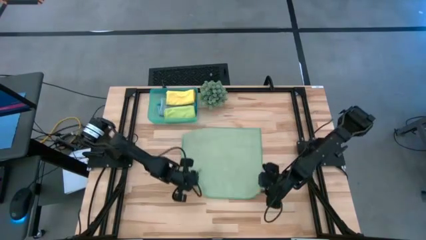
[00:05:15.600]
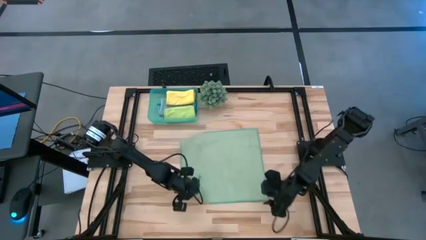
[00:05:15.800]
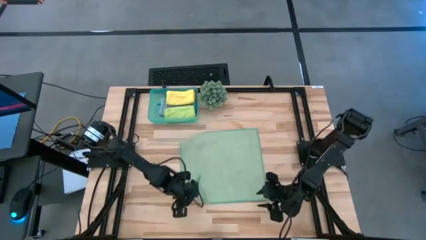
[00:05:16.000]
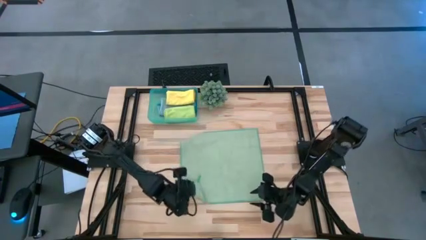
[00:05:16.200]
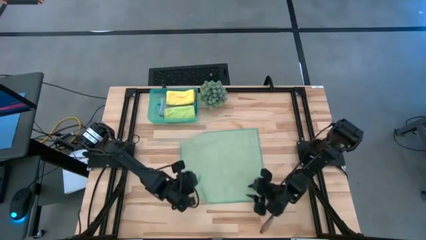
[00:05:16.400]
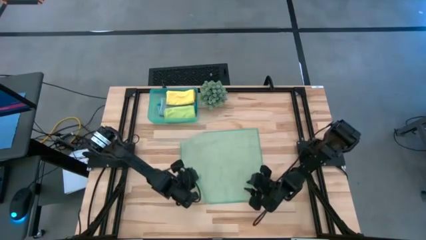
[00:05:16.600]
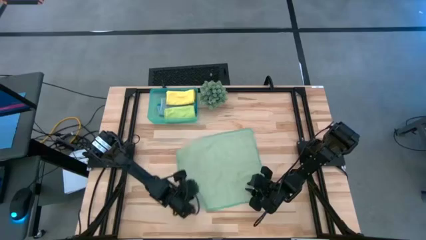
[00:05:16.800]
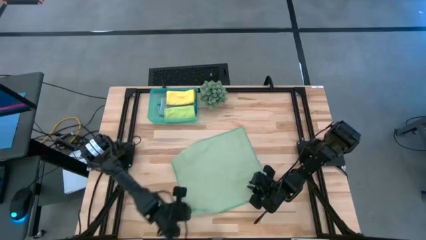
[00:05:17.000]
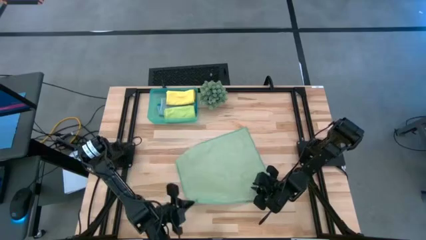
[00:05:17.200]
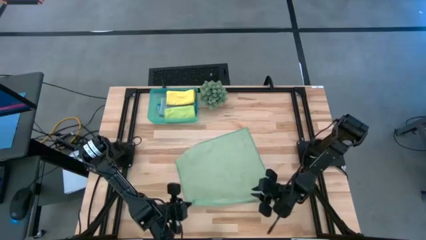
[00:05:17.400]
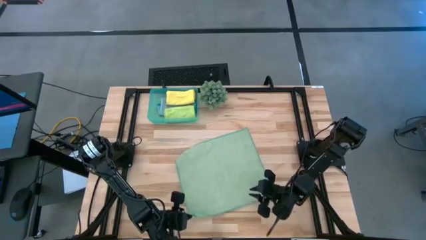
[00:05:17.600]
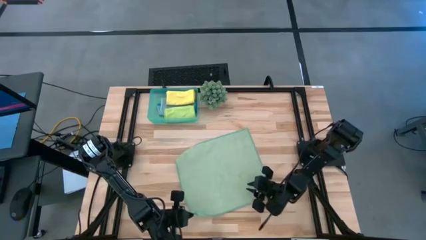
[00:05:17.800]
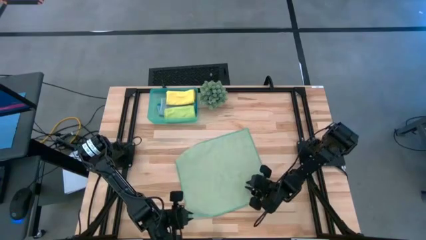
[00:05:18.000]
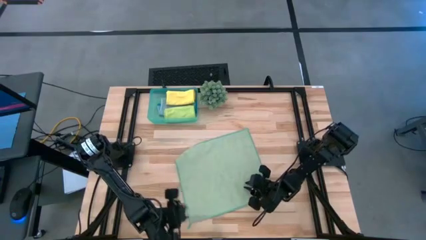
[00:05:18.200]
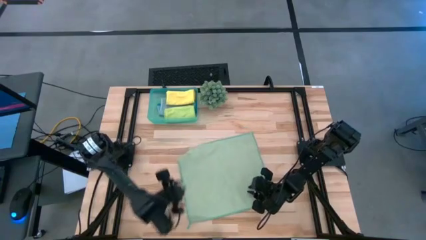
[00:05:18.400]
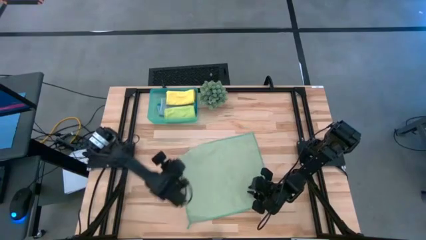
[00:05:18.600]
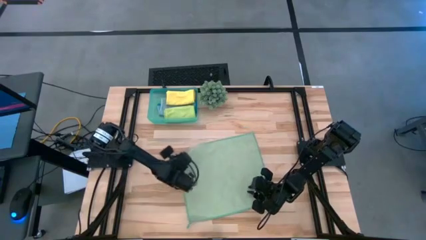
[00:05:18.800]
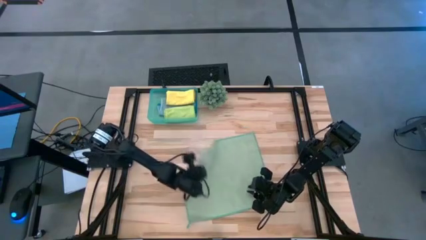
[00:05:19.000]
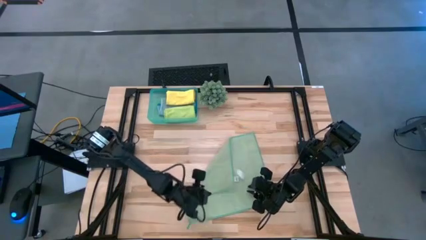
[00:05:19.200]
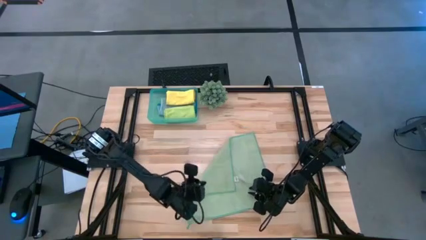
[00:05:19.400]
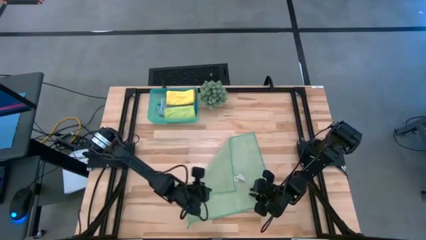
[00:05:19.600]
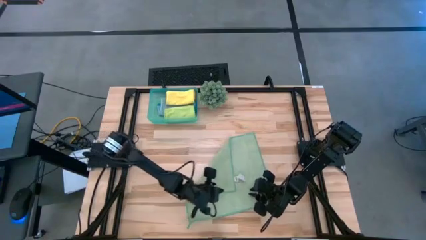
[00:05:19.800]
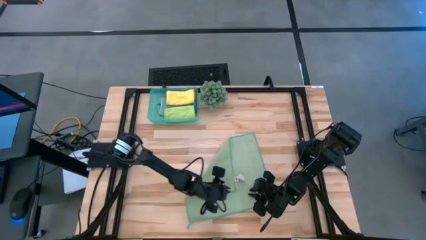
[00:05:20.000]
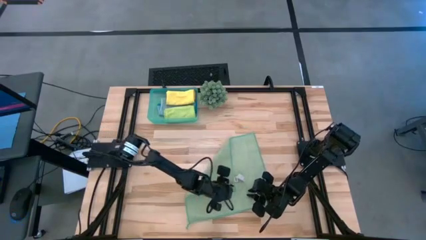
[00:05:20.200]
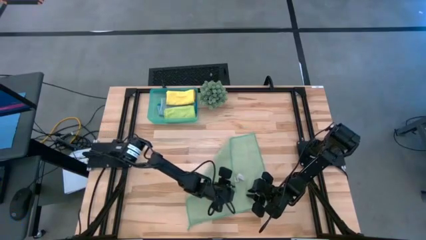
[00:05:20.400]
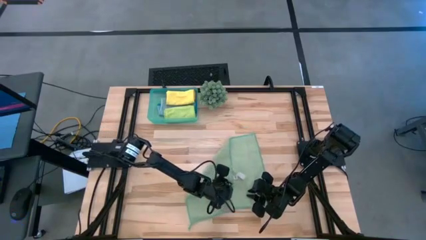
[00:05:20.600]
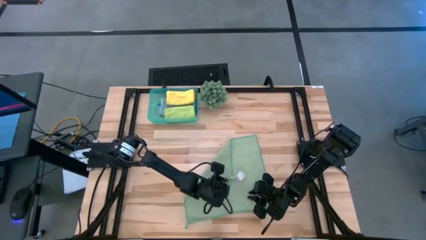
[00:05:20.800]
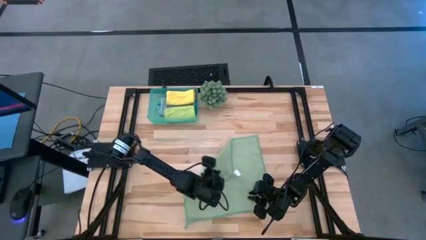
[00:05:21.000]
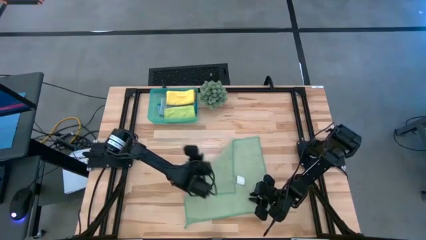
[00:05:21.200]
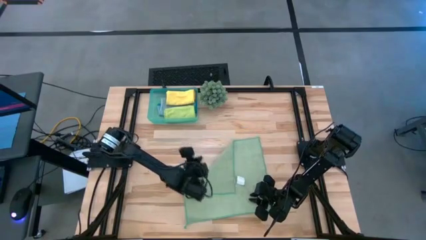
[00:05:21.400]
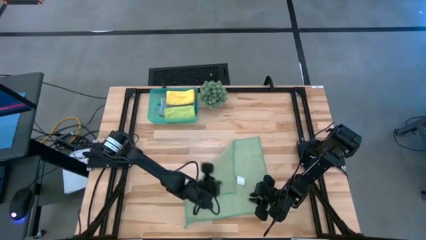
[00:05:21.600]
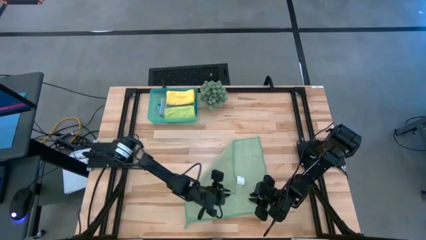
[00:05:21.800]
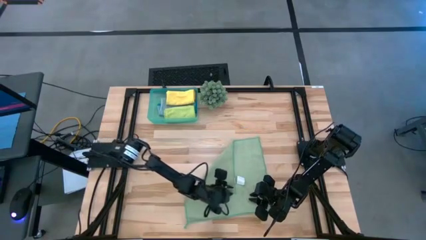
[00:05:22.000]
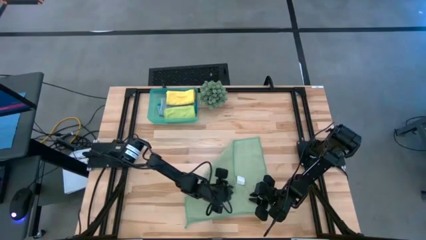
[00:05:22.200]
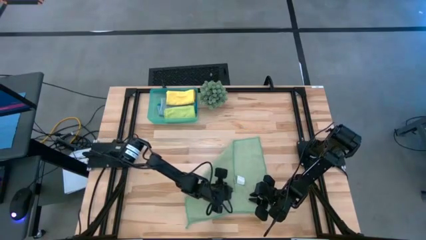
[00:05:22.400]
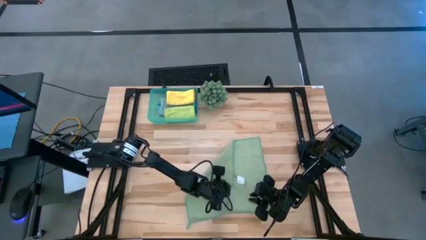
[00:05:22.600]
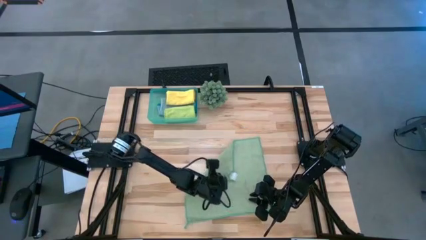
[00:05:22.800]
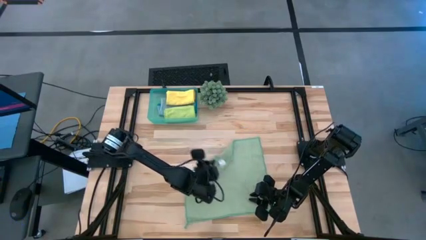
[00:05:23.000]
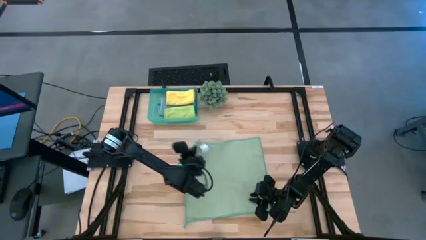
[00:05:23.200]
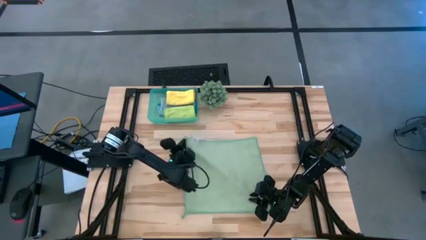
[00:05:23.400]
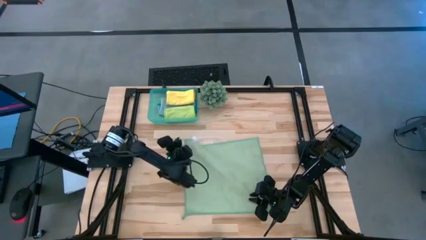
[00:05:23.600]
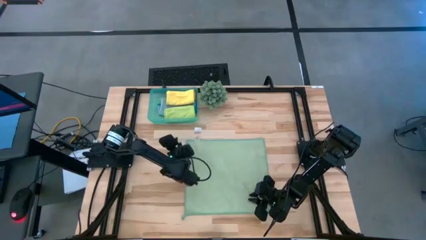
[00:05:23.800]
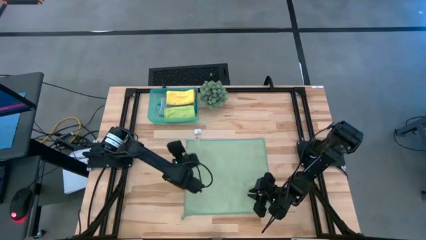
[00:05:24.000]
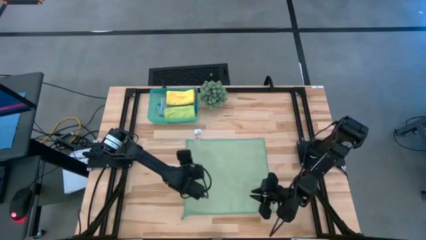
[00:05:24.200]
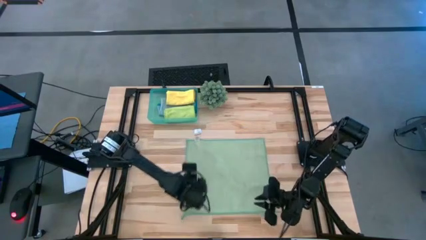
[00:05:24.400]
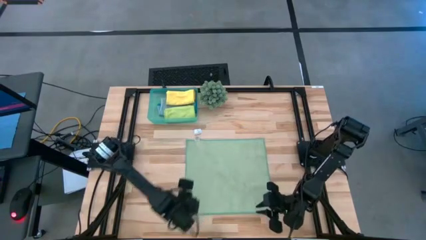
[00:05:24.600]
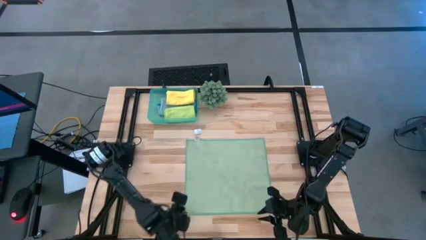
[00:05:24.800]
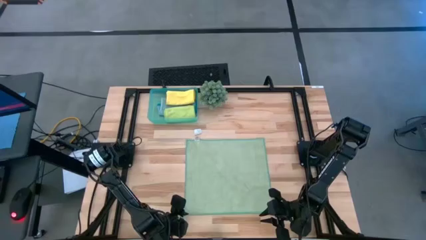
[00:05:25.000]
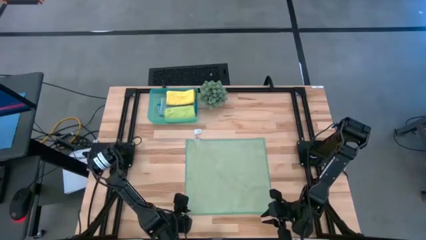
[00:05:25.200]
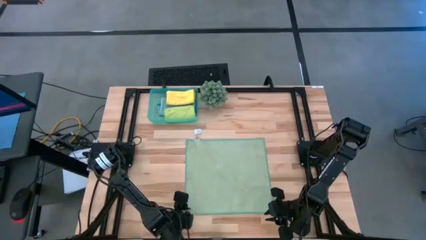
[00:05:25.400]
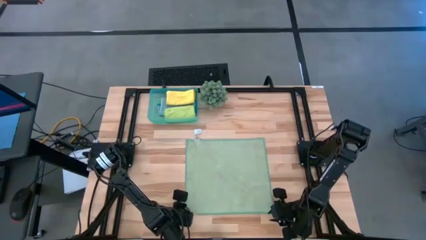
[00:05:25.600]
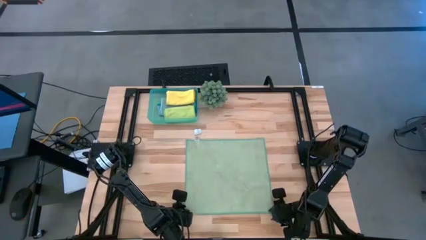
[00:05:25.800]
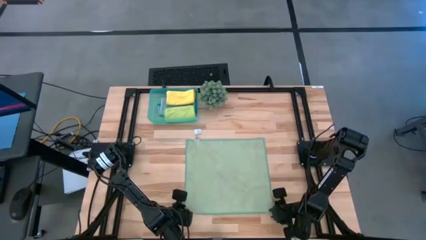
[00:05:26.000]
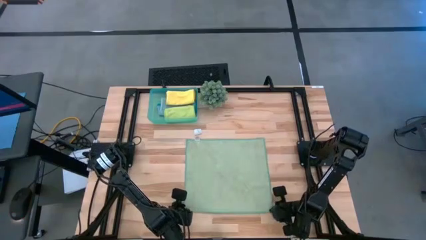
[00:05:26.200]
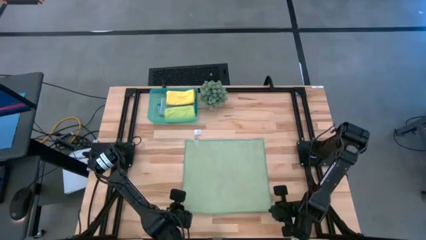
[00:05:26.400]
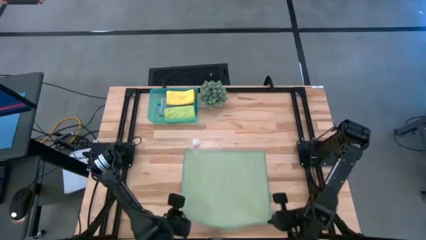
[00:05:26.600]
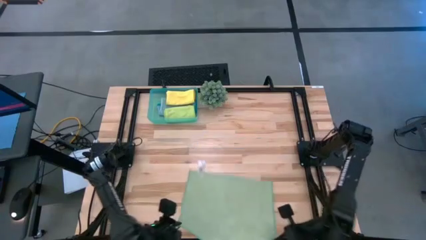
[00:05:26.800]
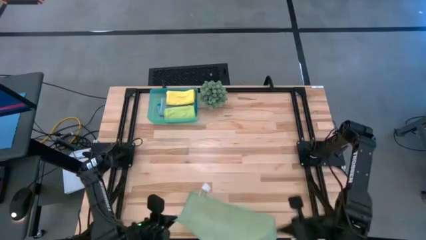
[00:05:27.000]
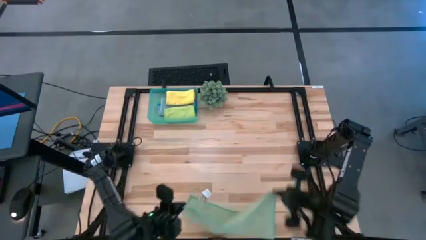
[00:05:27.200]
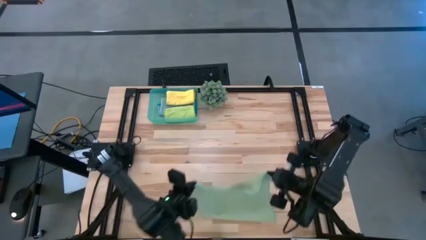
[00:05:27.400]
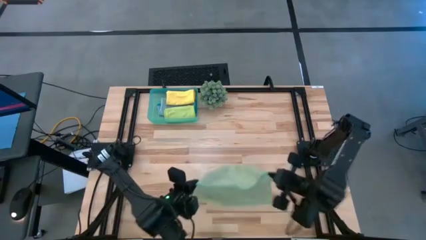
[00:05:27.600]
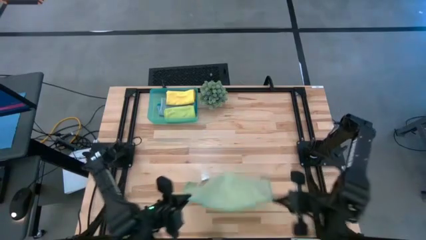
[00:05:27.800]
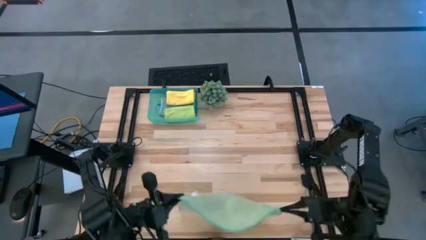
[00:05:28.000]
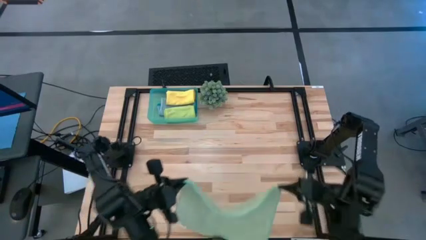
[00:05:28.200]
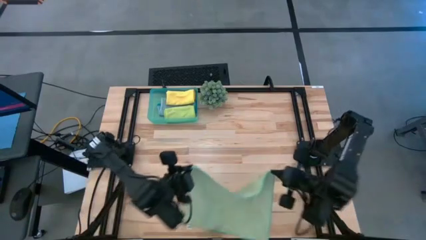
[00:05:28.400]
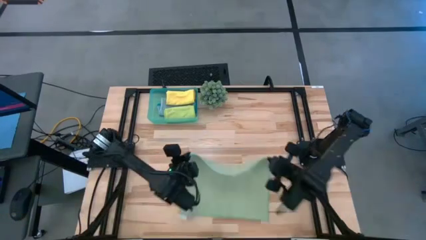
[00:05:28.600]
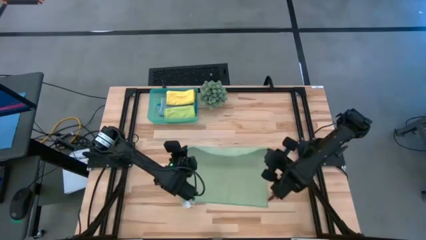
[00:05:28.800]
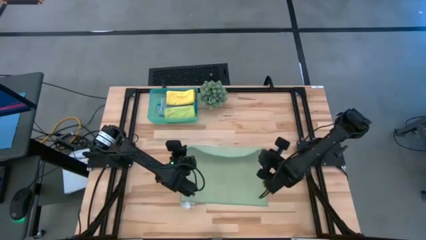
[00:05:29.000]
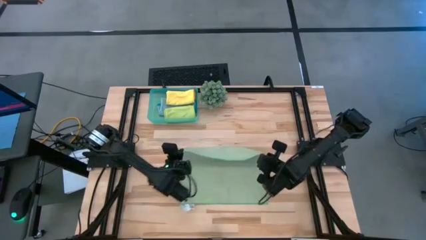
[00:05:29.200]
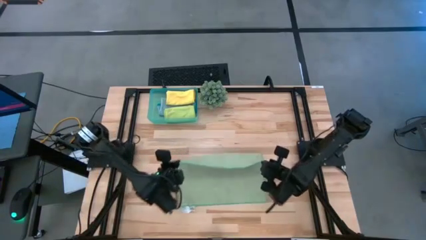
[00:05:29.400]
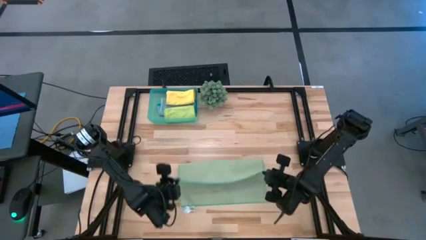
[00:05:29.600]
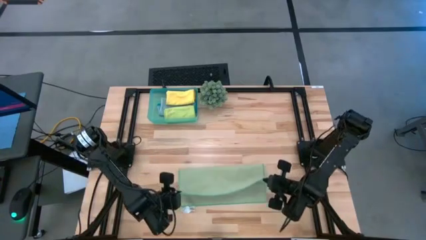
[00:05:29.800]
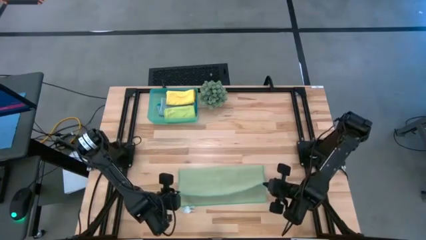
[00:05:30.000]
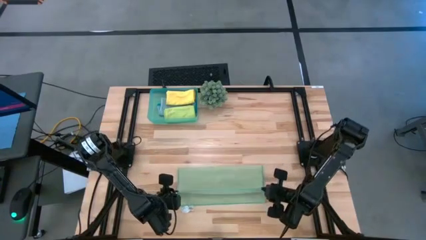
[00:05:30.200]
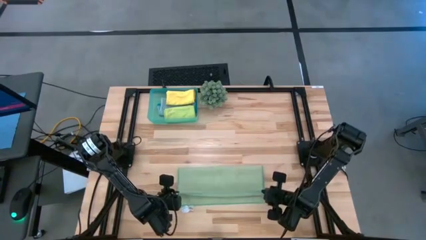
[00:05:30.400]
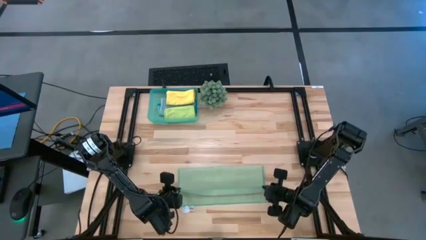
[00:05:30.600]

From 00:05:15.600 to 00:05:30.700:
Task: Fold microfiber towels
Fold the green microfiber cloth
